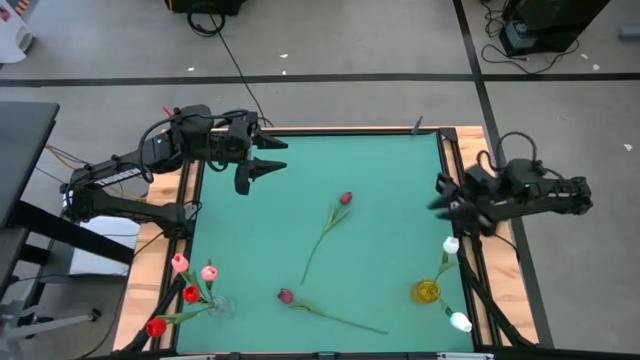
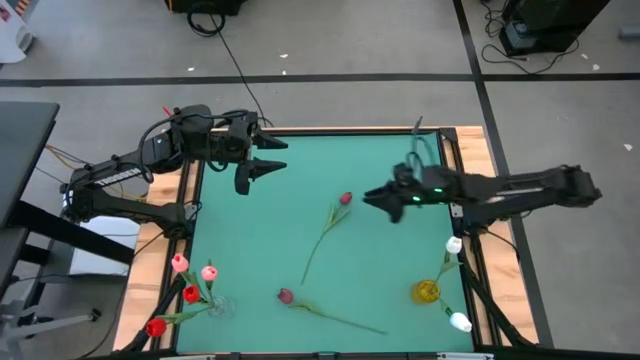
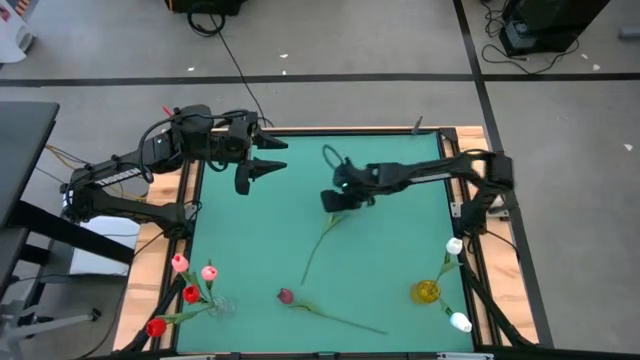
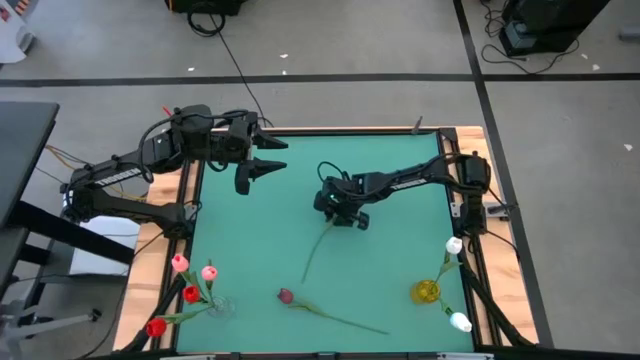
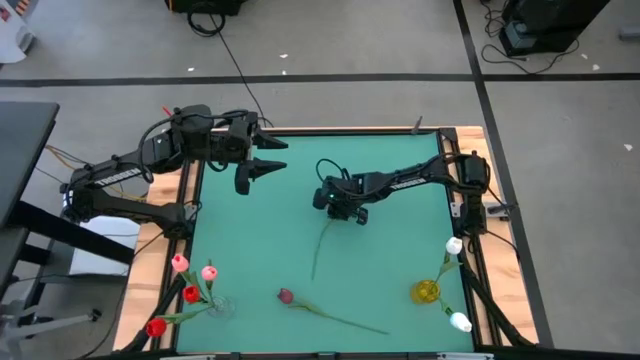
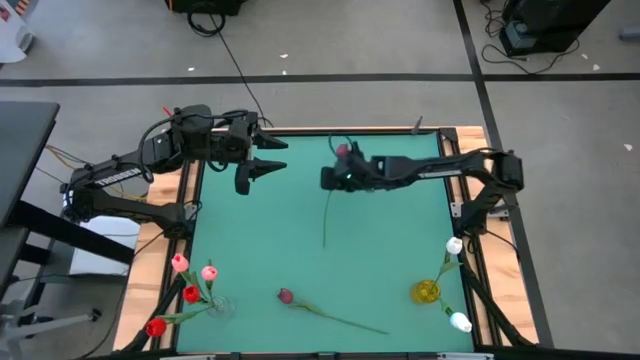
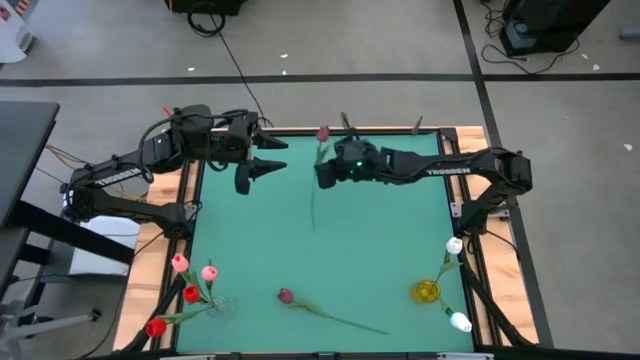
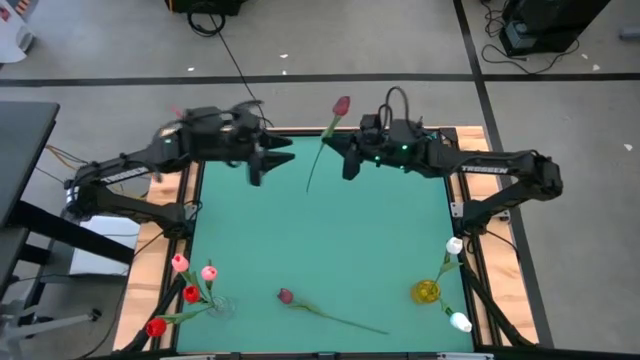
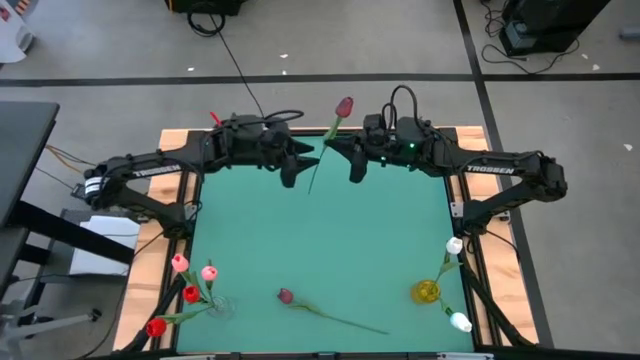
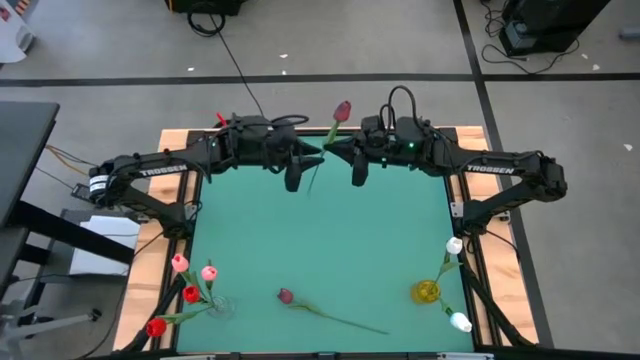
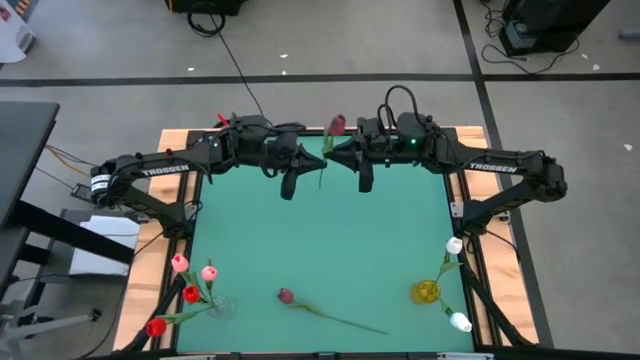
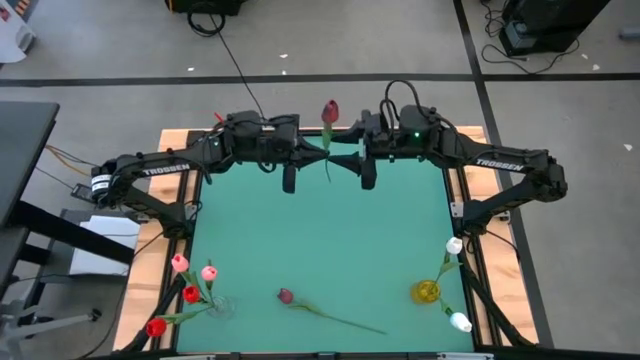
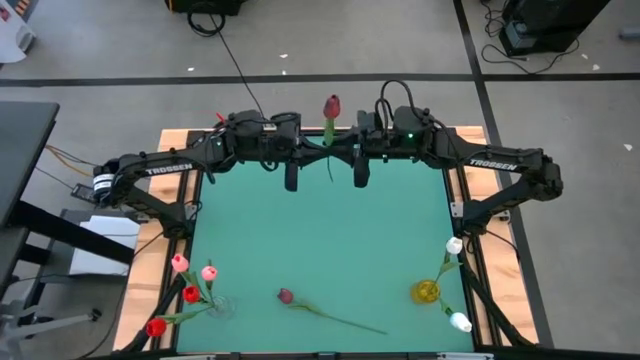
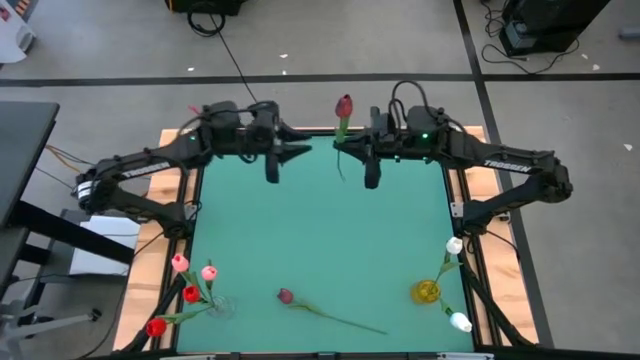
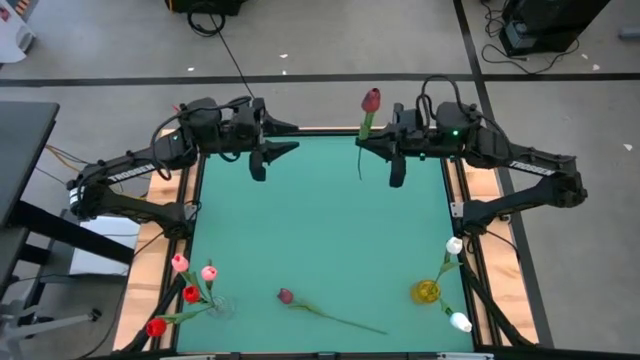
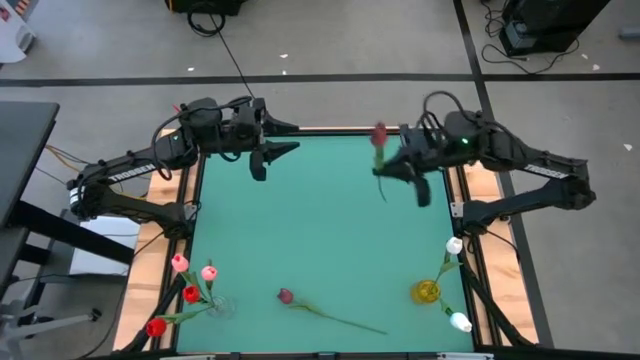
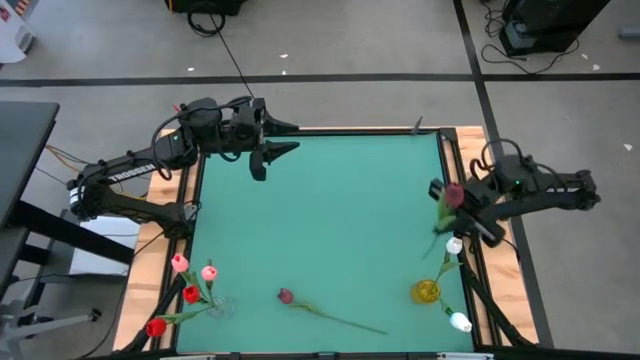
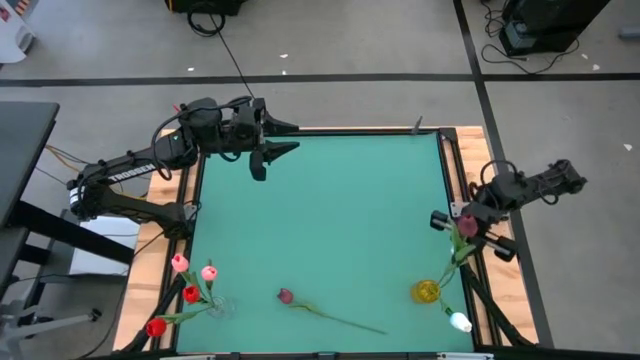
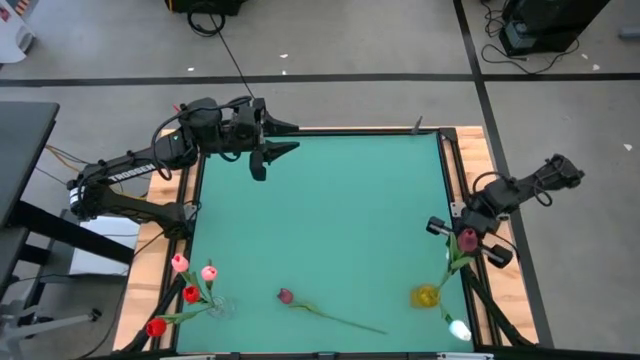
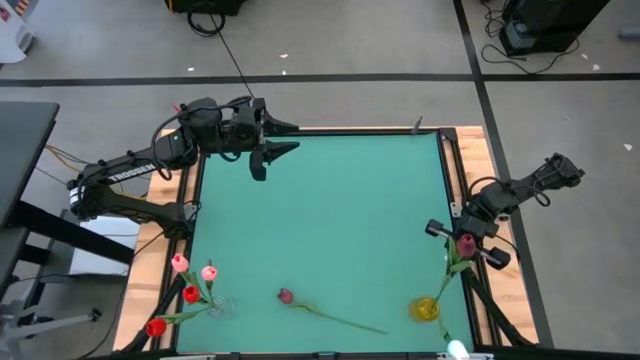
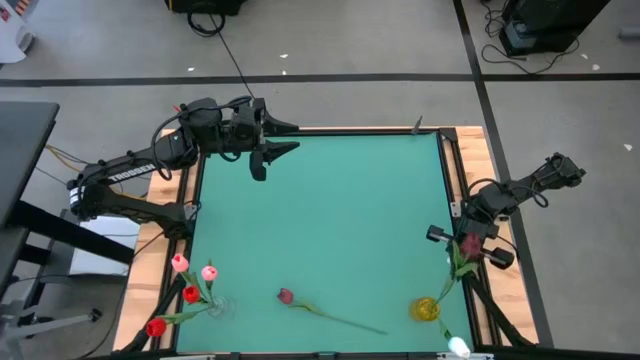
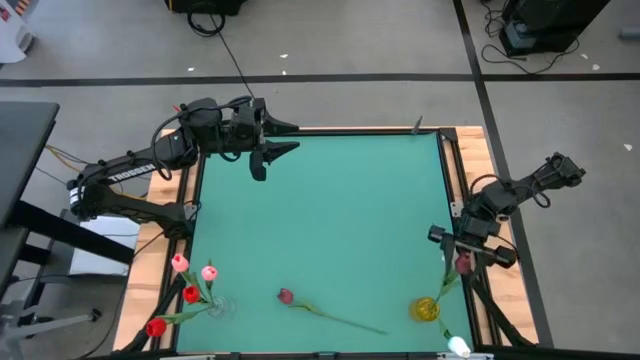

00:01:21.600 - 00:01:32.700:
Task: Sort flowers into vase by color
Put the top dark red flower into the yellow transparntl vase

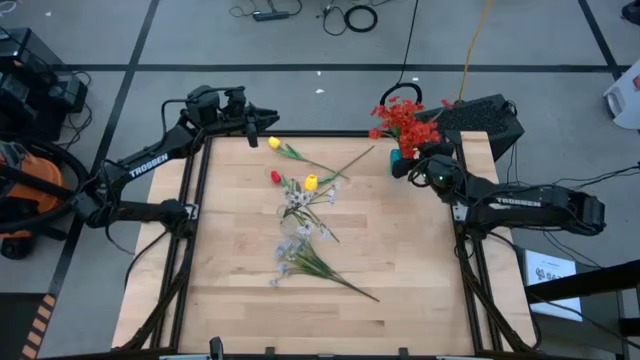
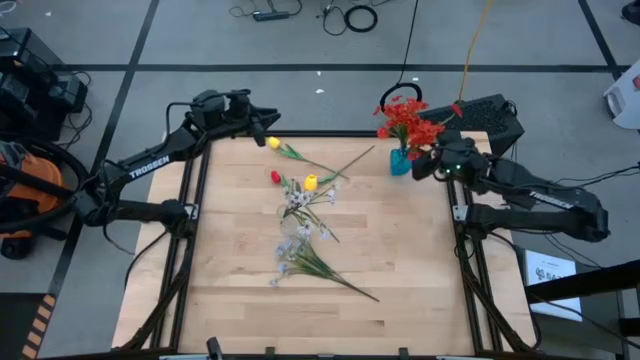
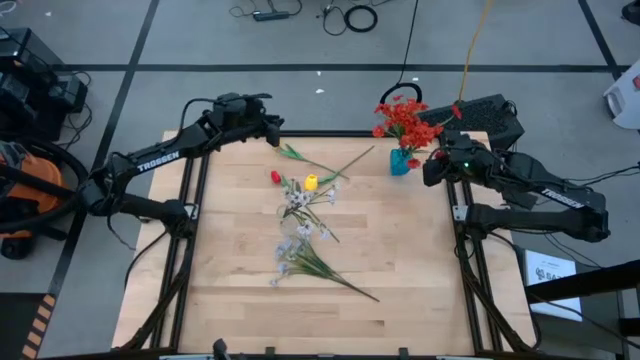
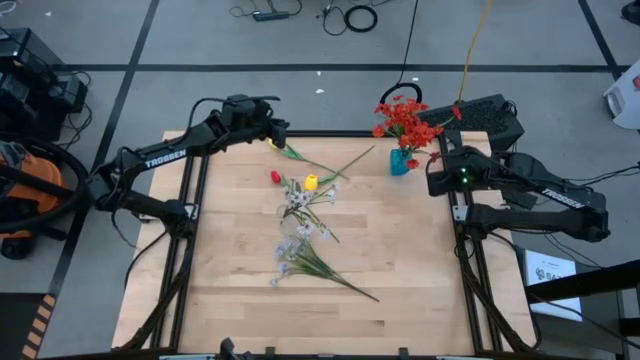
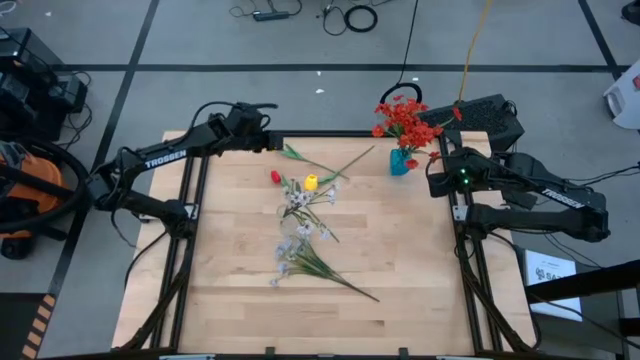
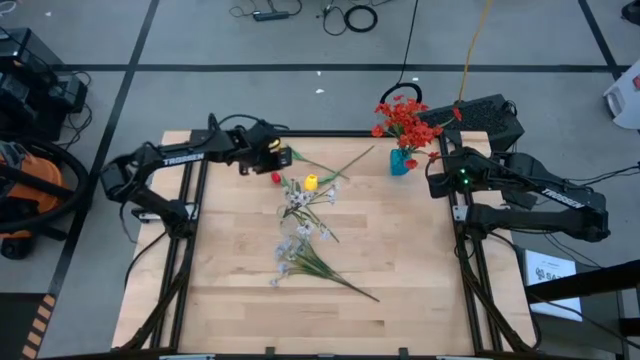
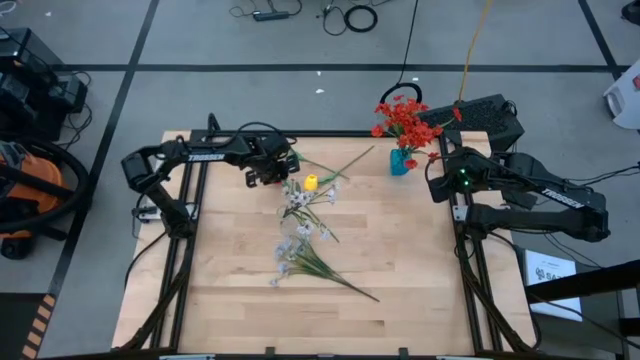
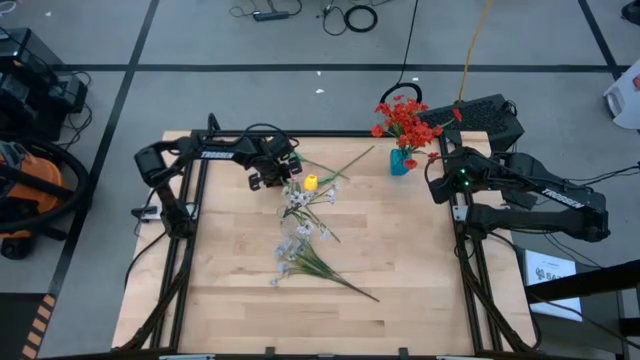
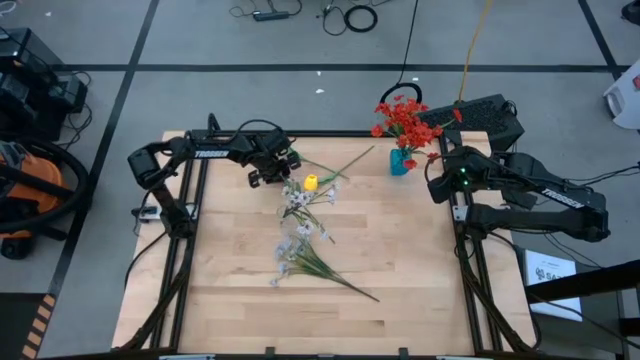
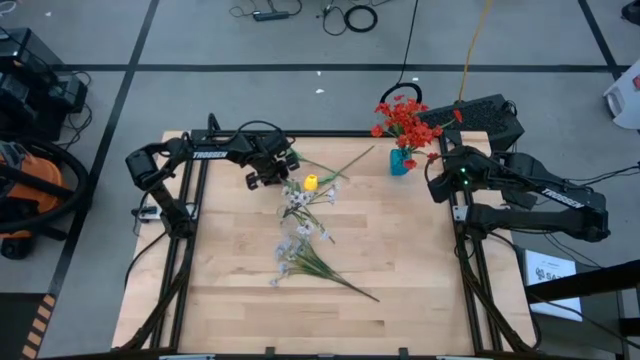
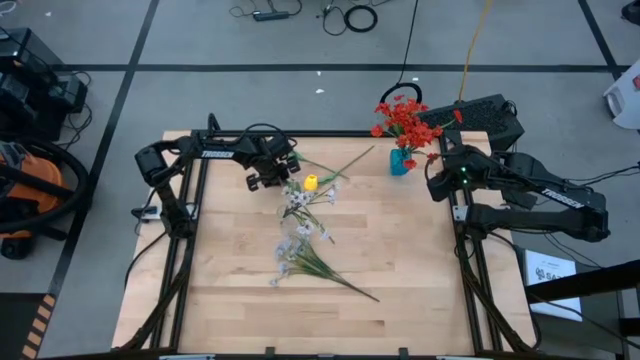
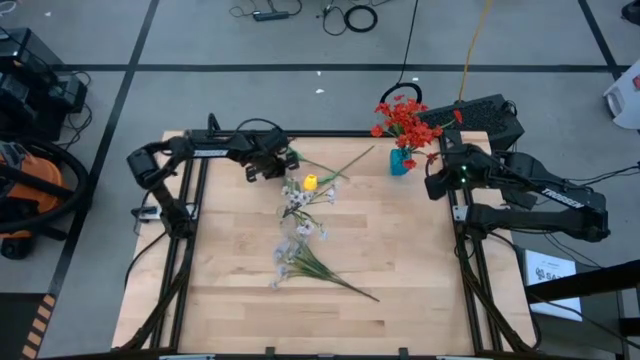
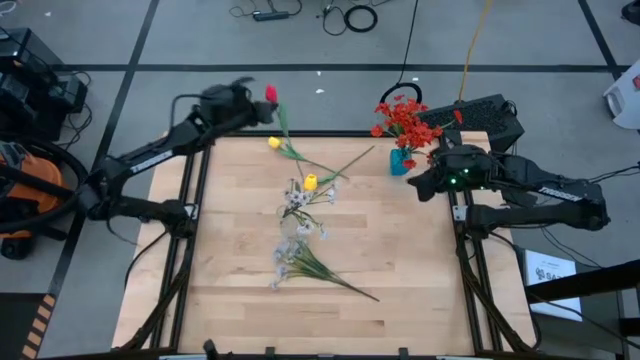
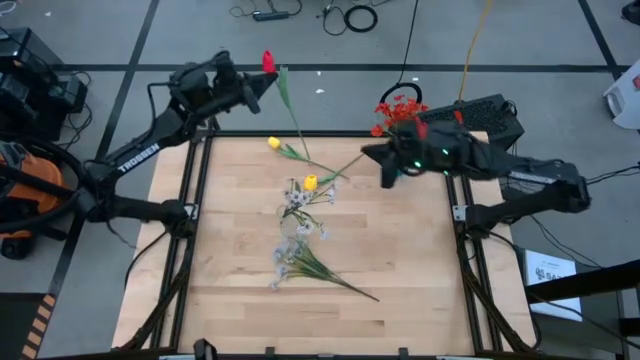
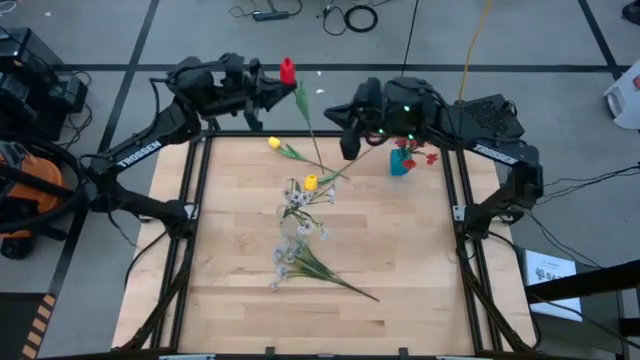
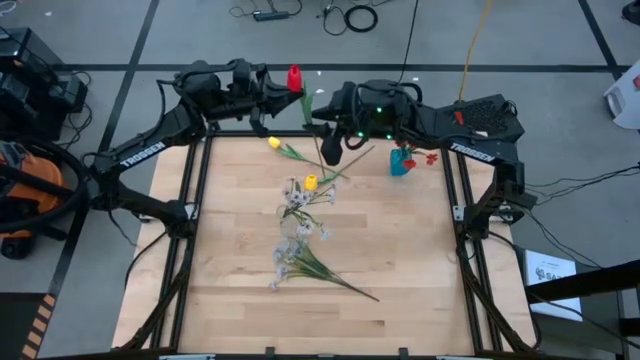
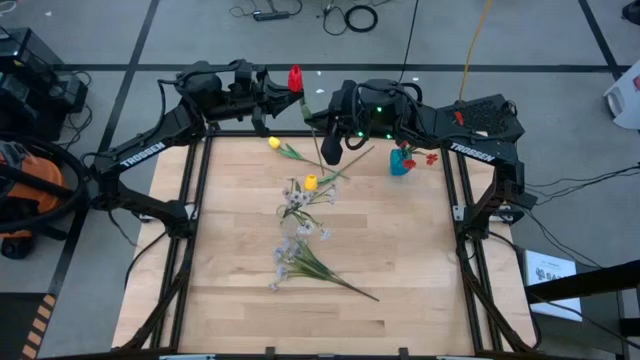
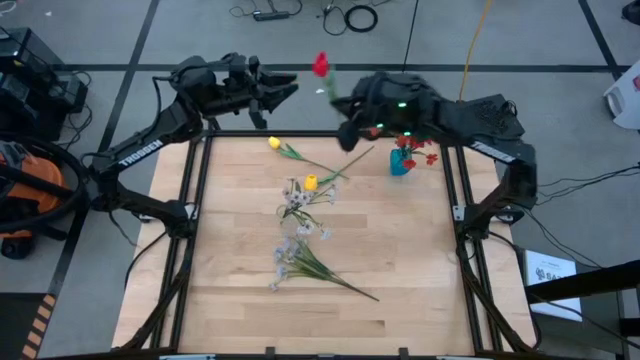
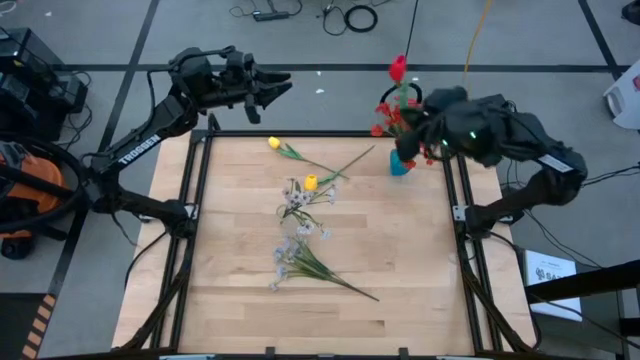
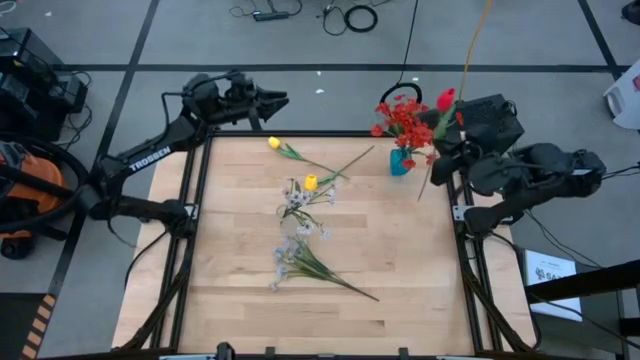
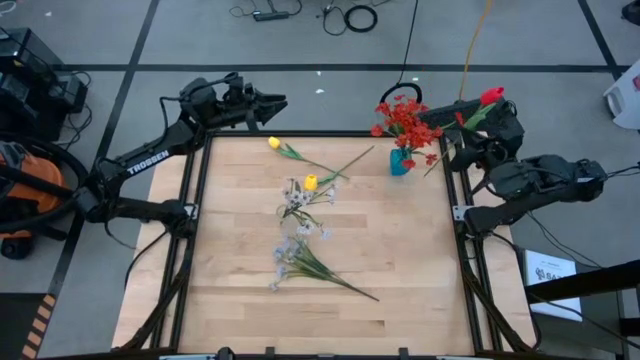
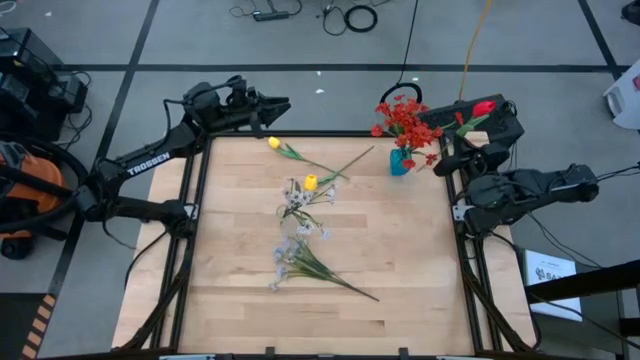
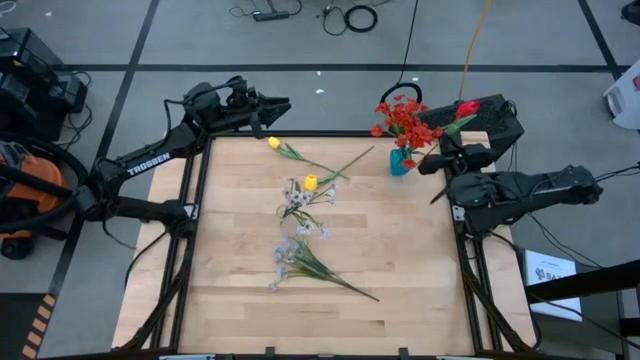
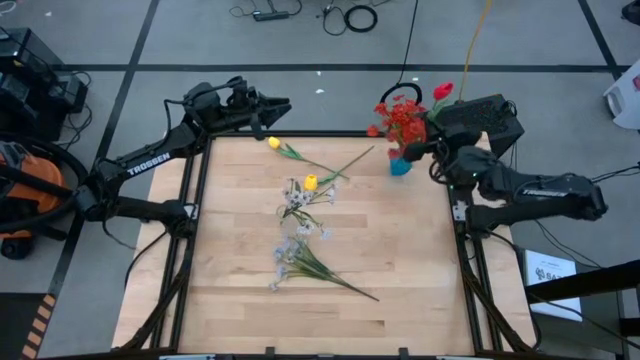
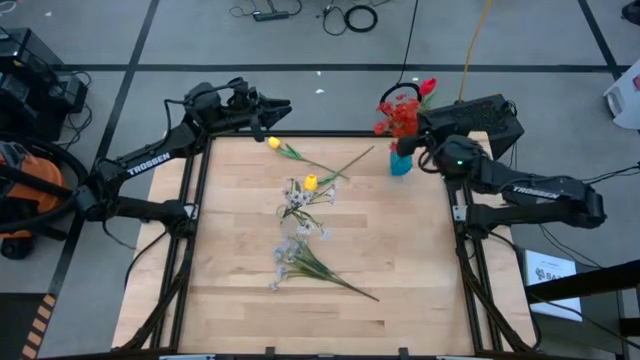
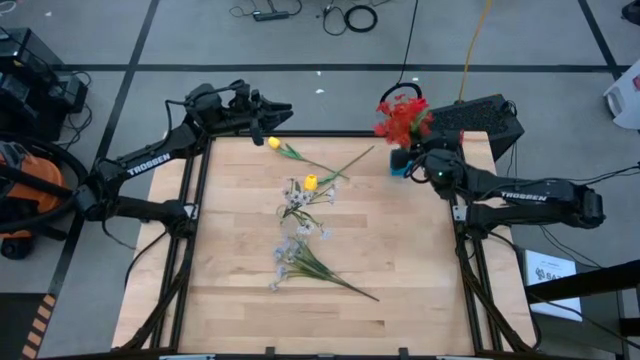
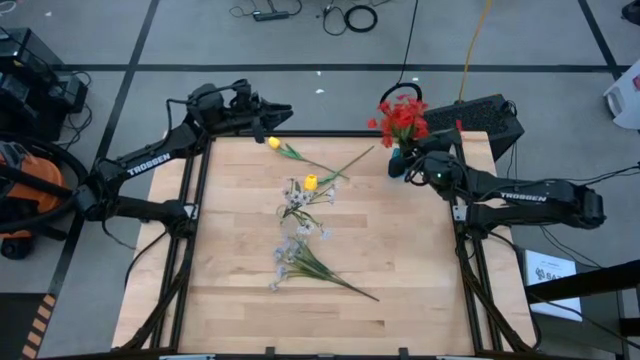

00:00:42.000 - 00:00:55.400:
Task: Sort flowers into vase by color
Put the bottom red flower into the blue flower vase
